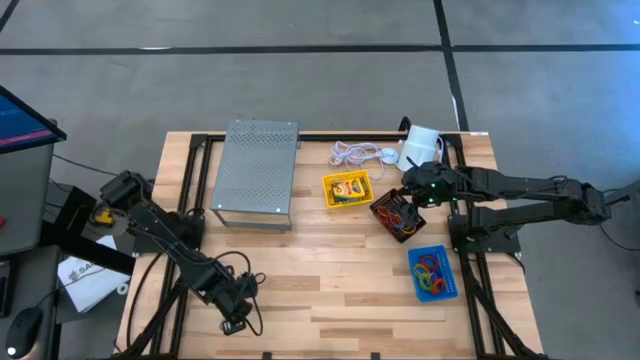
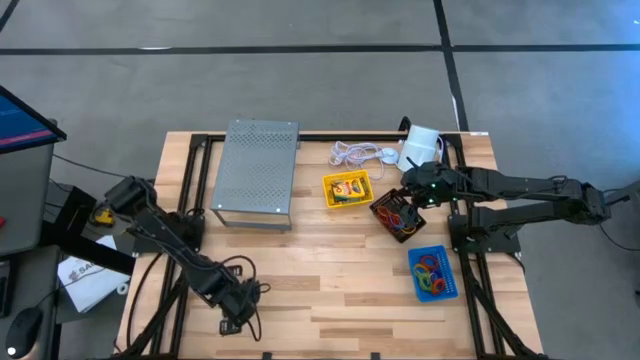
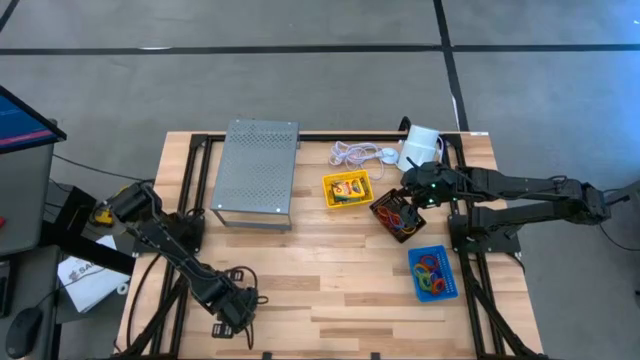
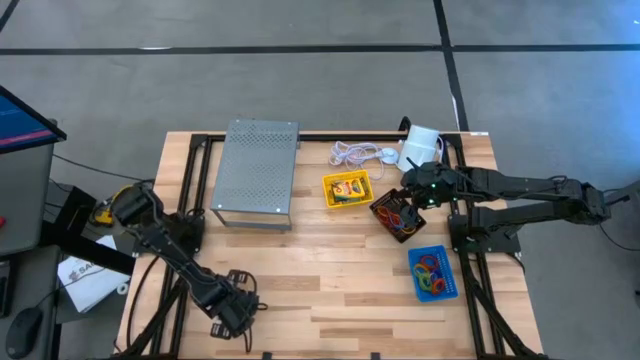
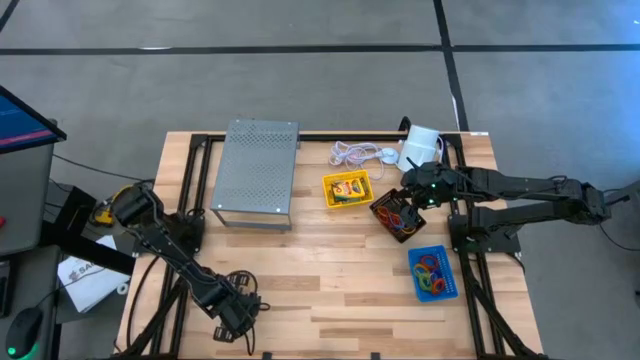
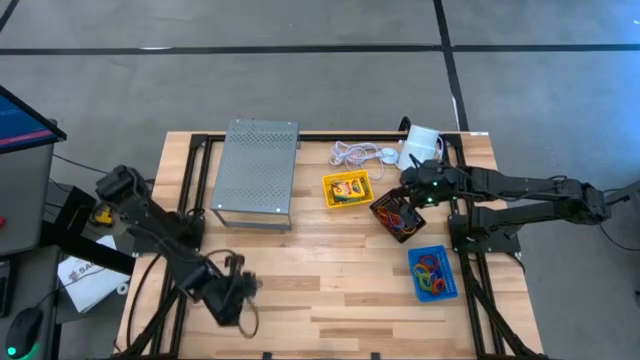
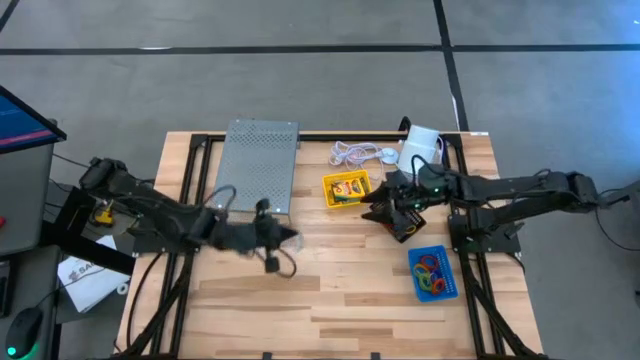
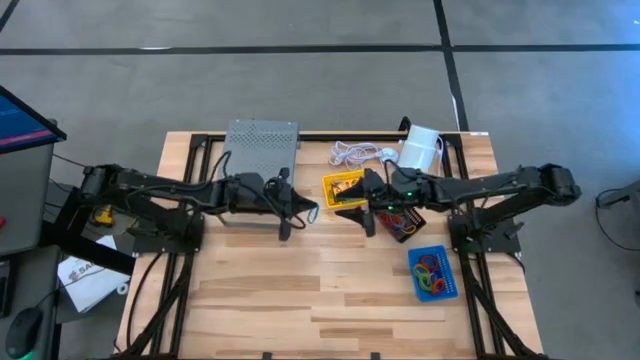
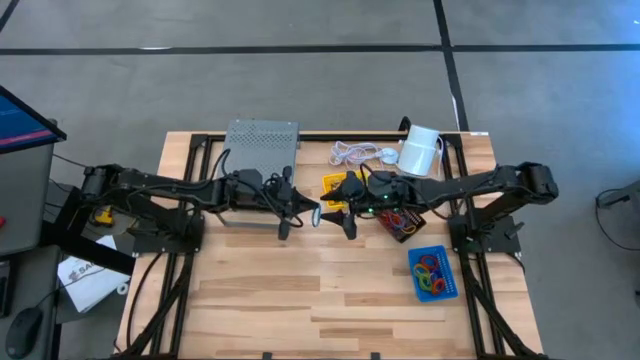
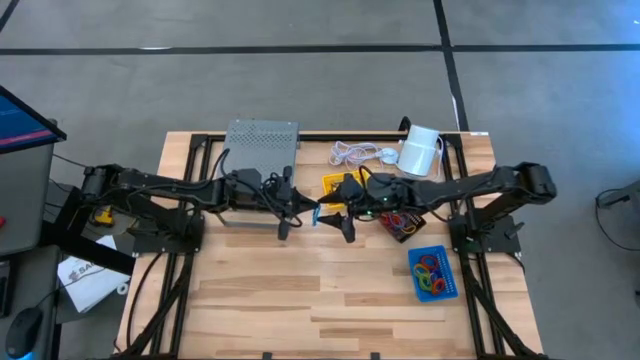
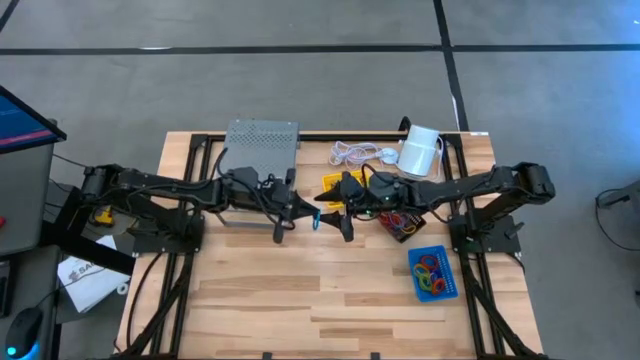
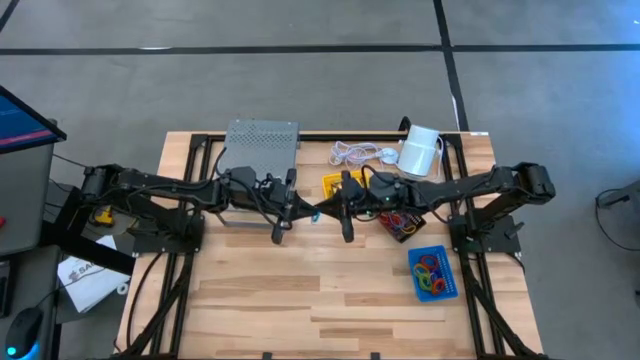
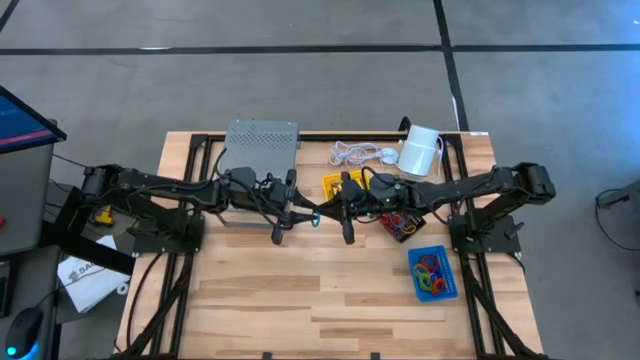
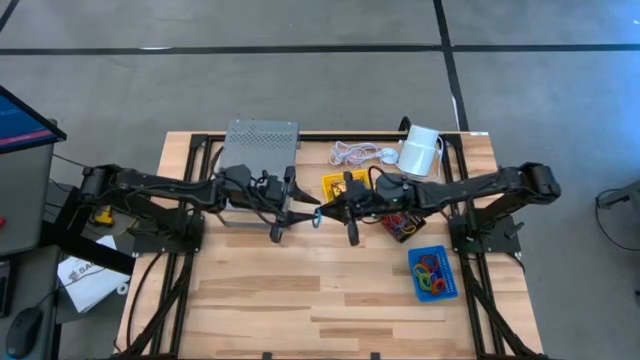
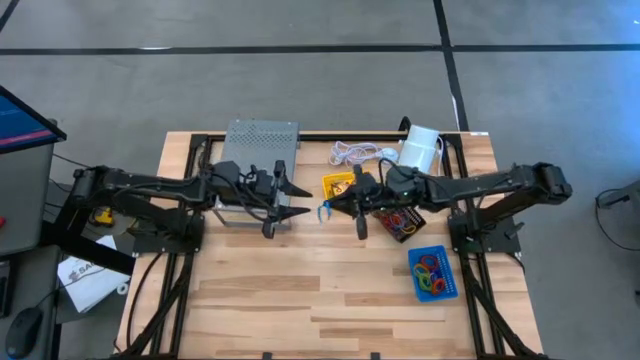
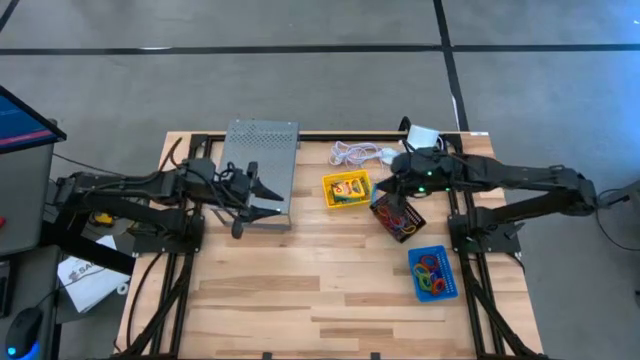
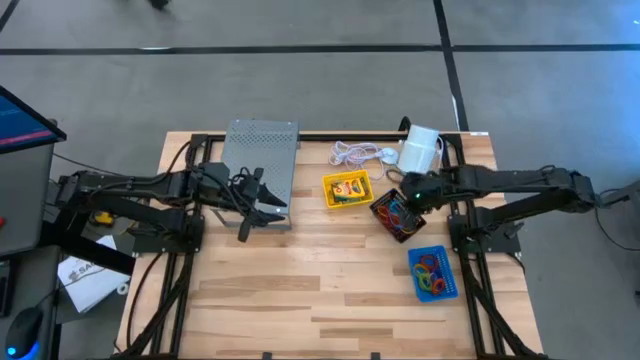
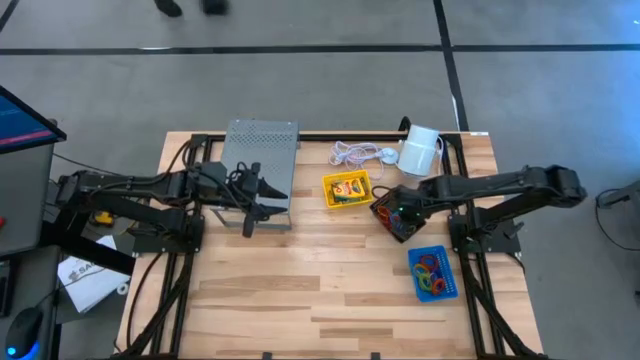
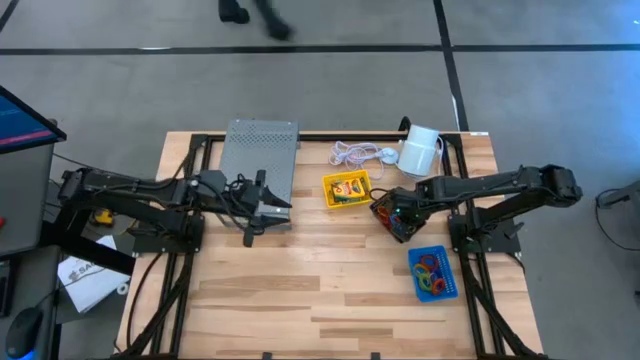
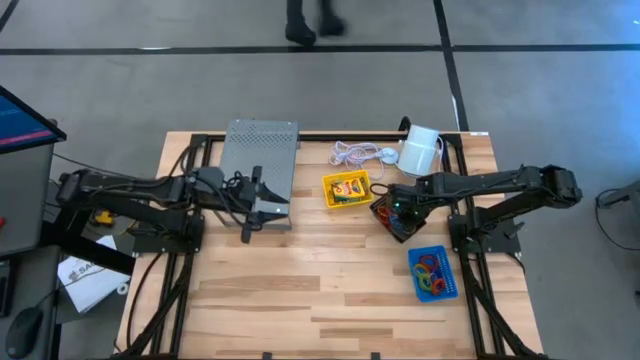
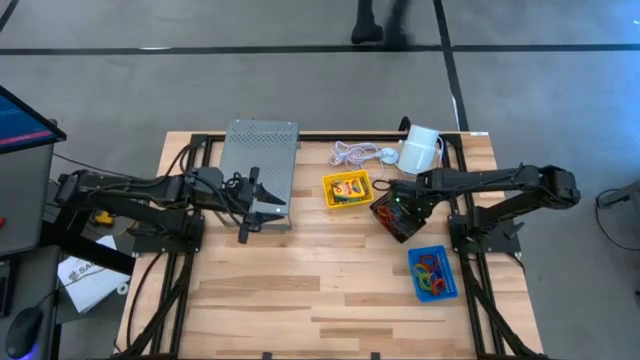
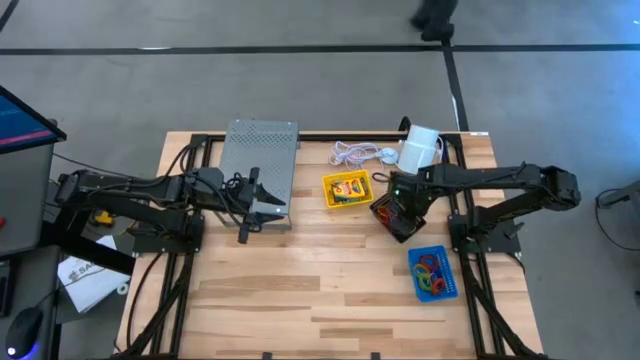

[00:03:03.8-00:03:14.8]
Task: Pick & Place Office Desk Supplies
Put the blue rubber band into the black bin
